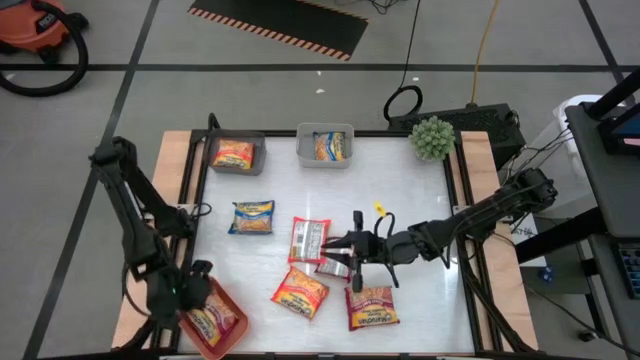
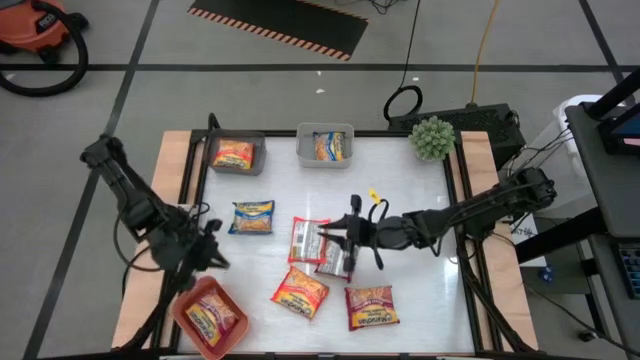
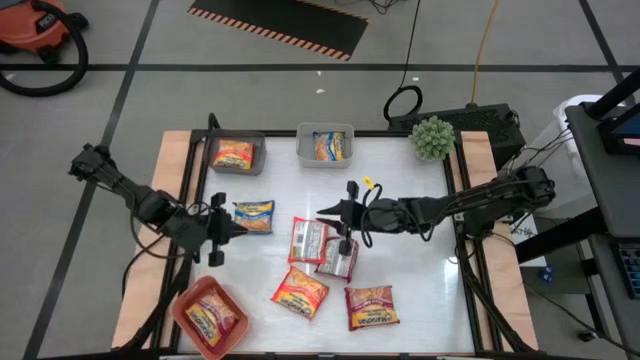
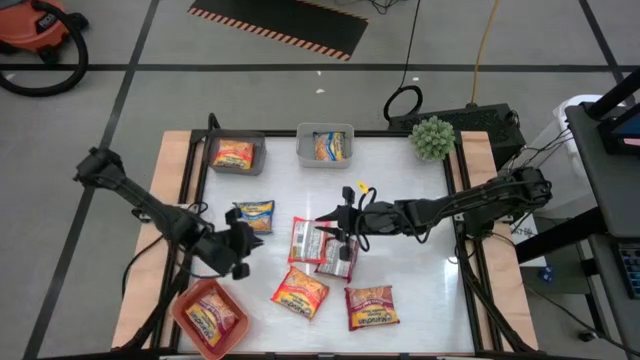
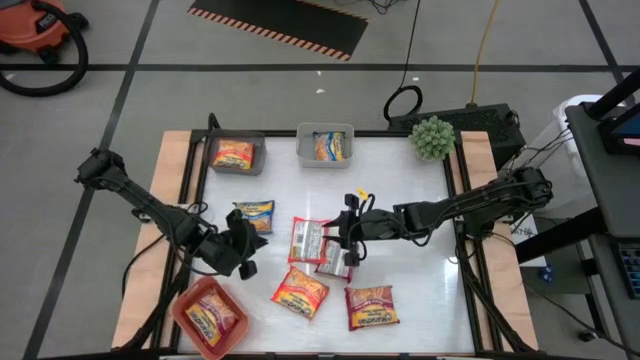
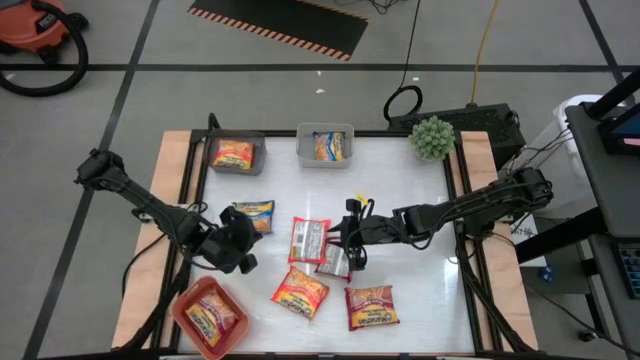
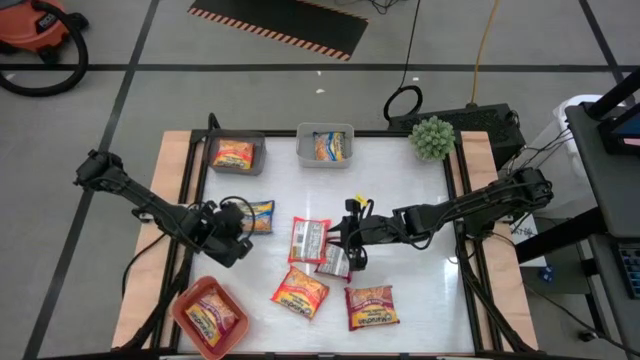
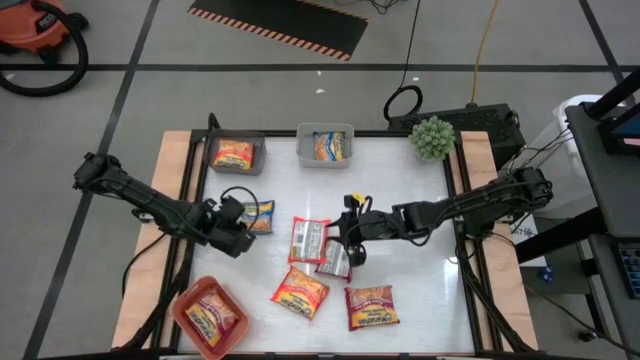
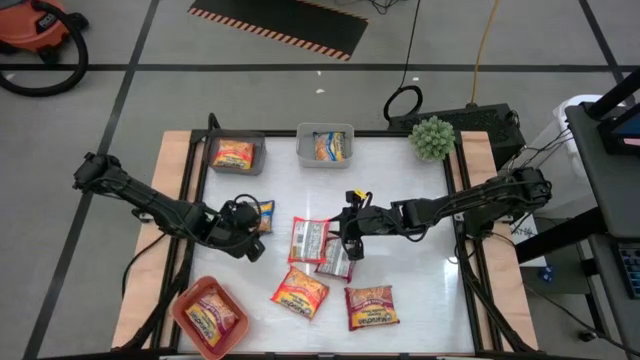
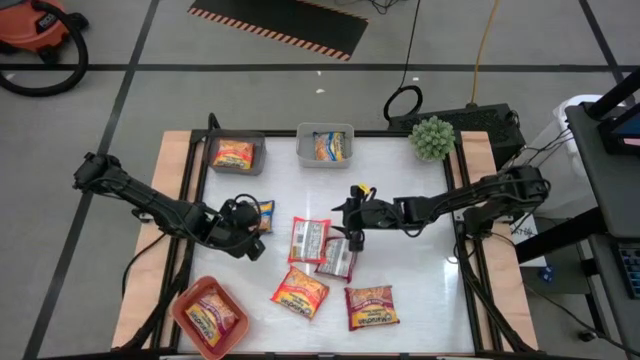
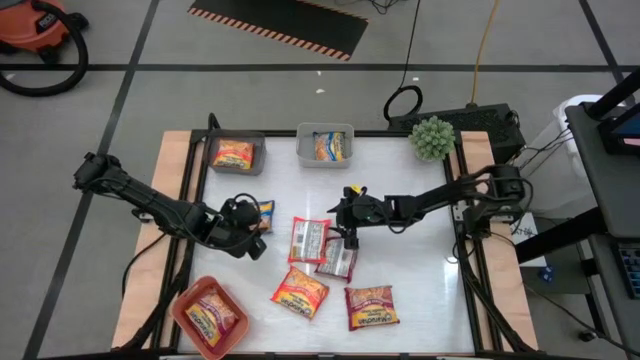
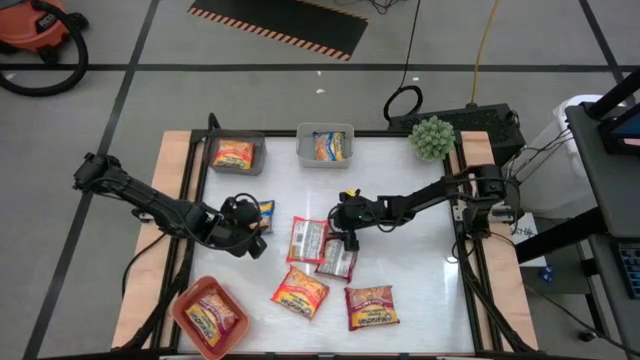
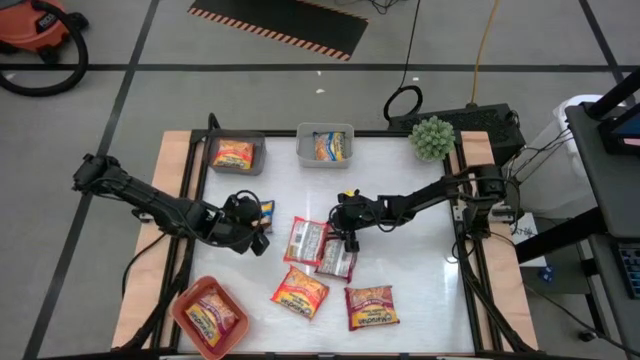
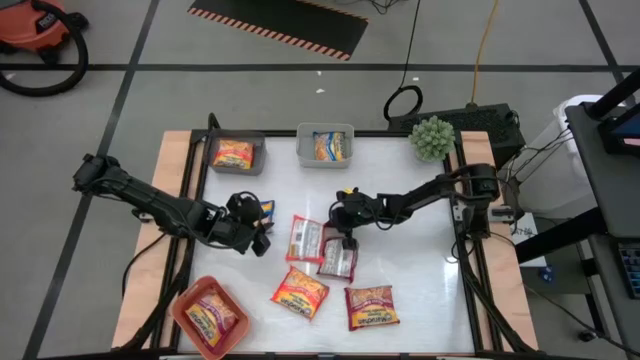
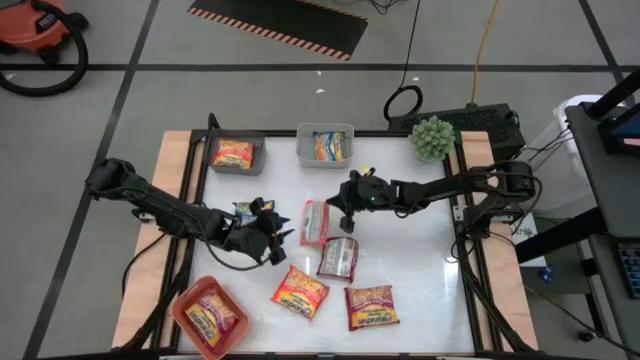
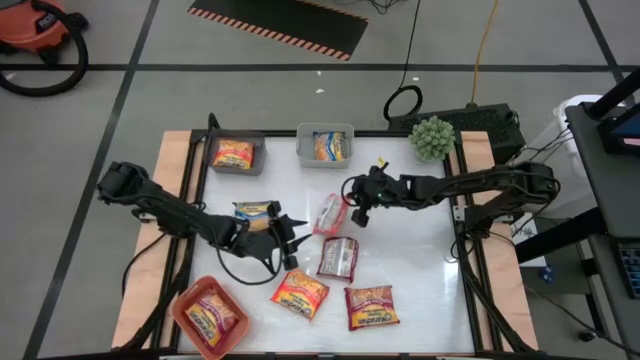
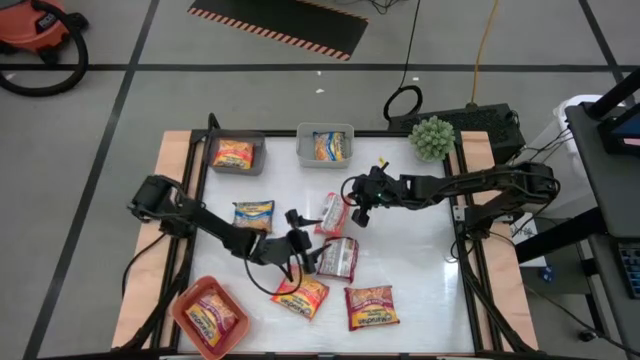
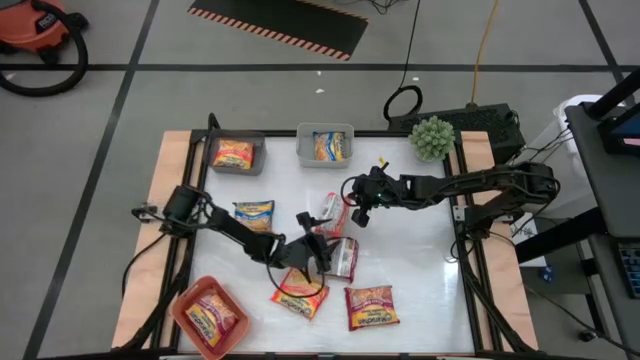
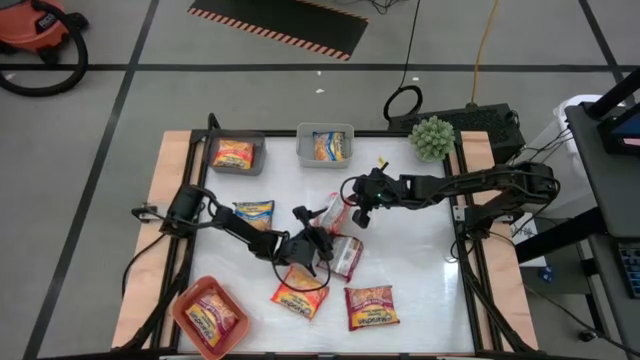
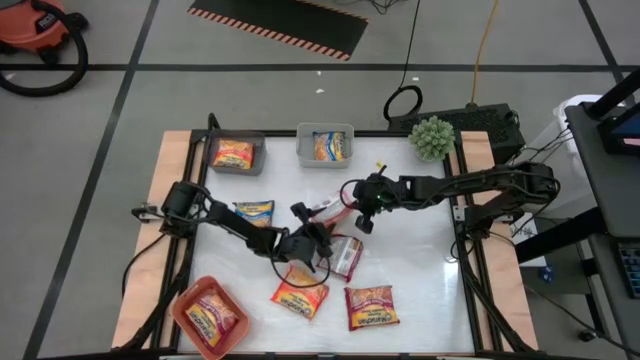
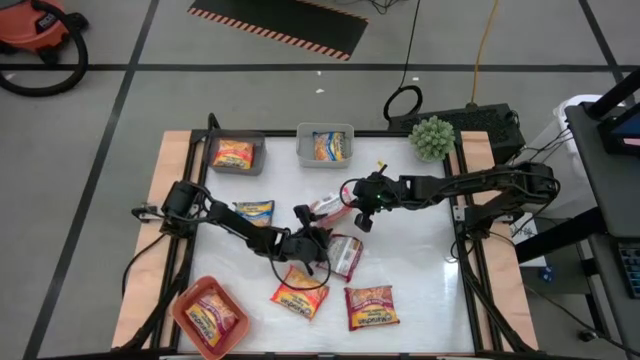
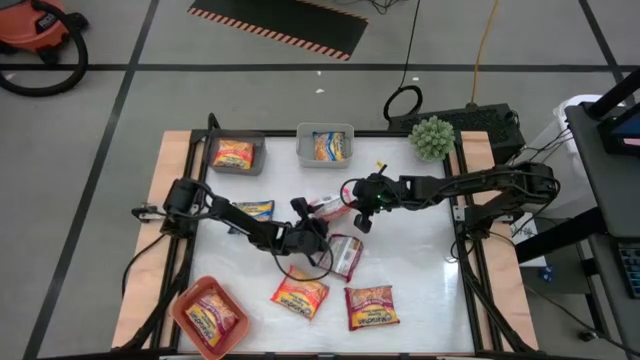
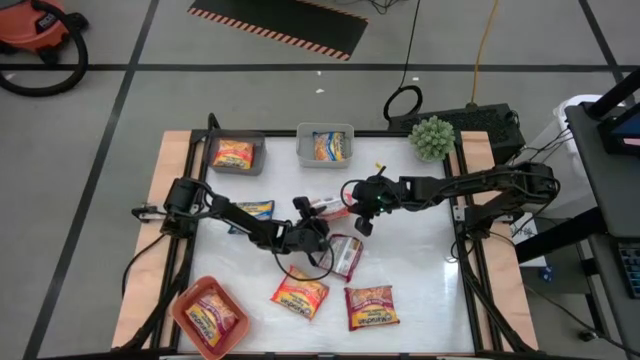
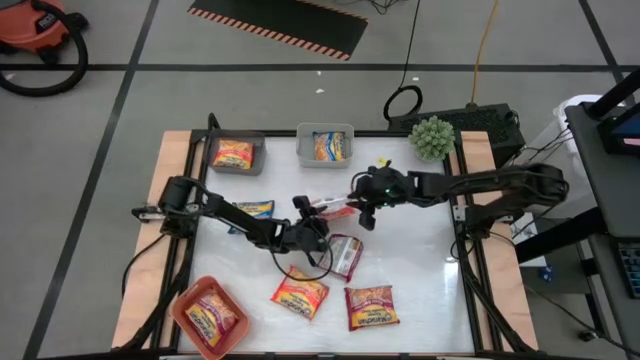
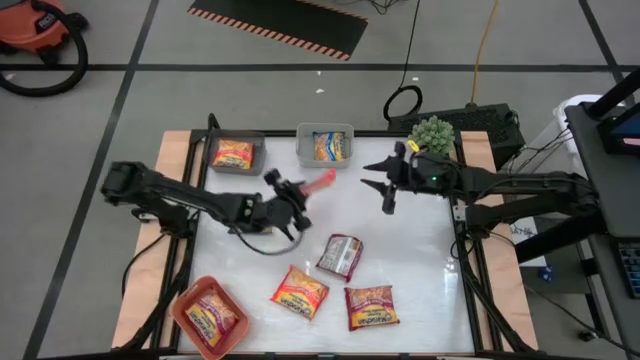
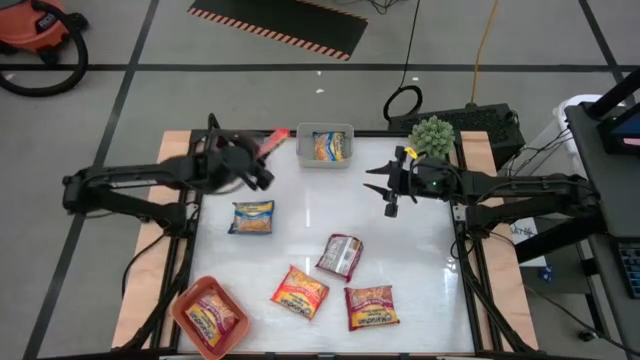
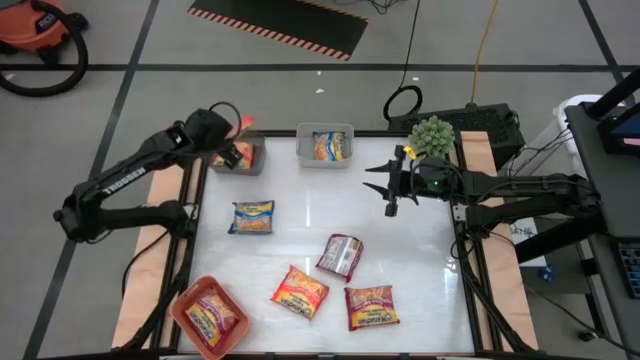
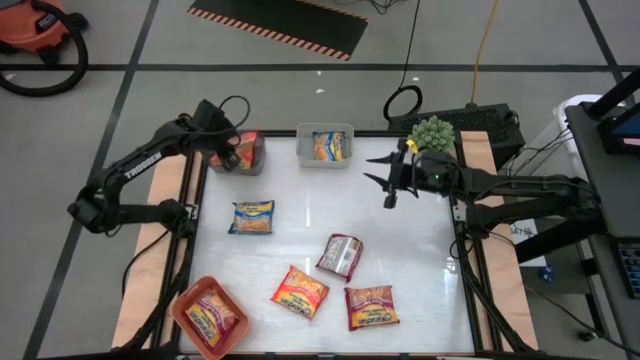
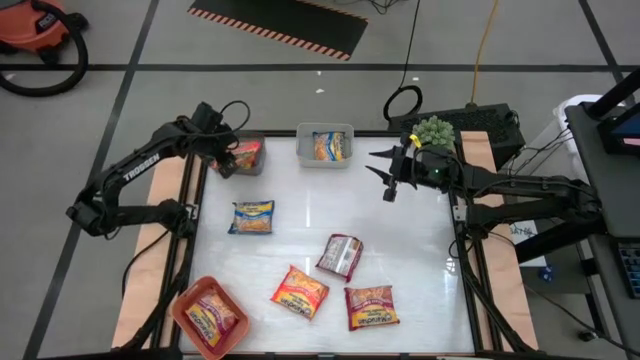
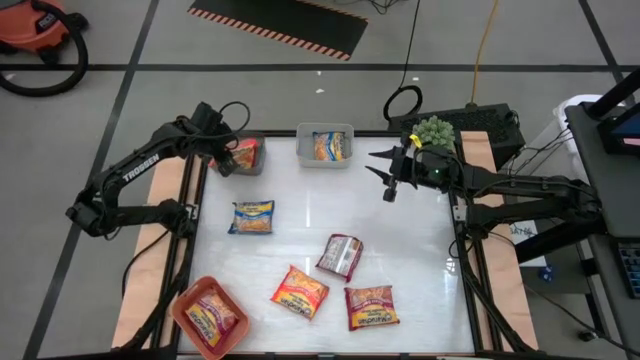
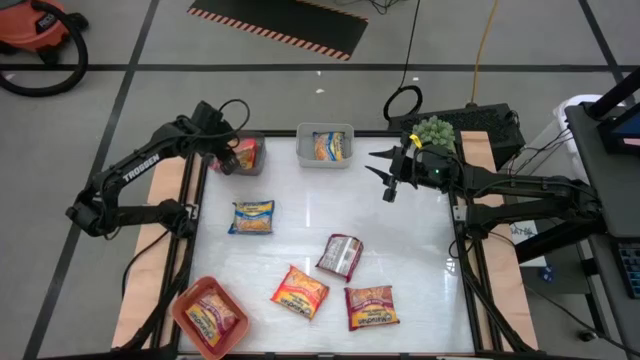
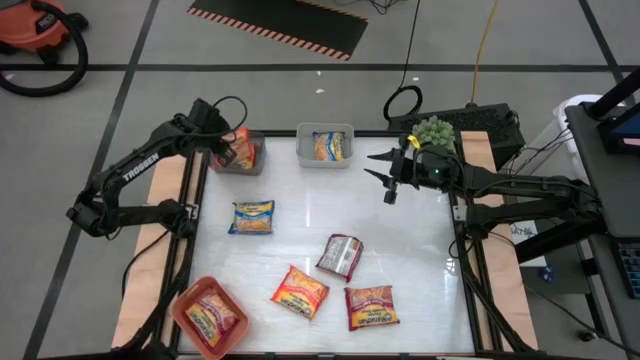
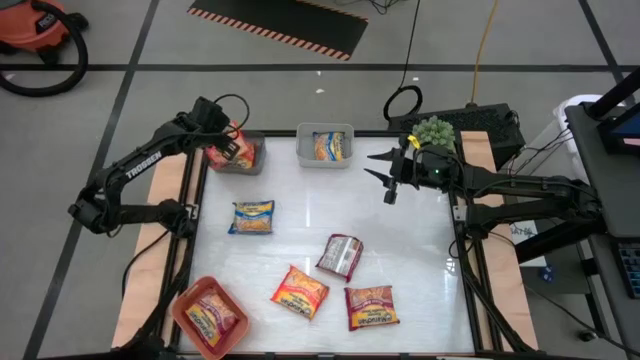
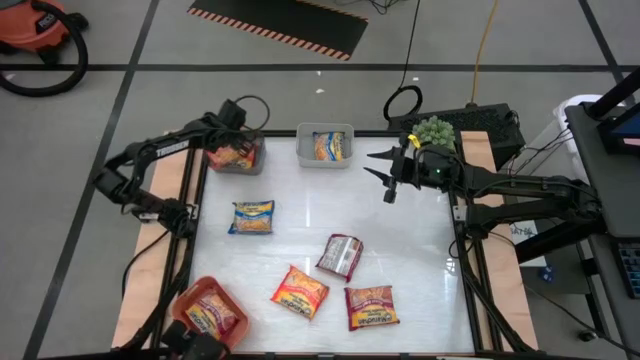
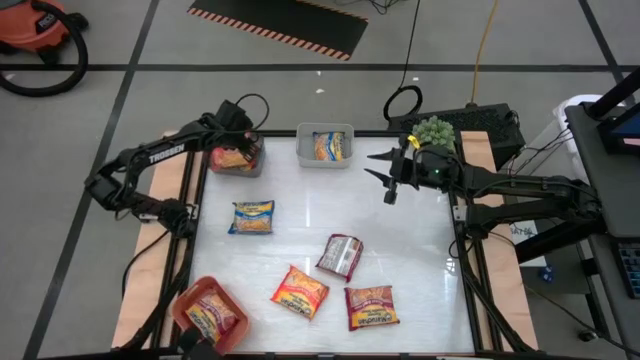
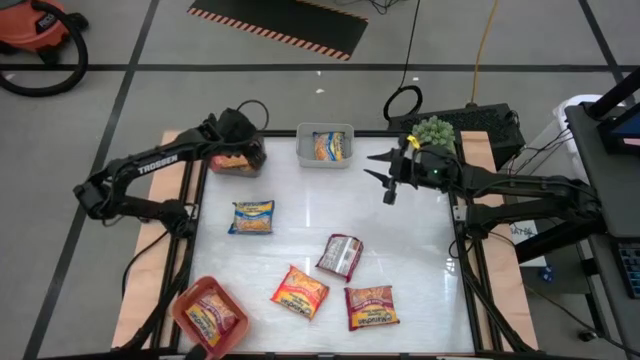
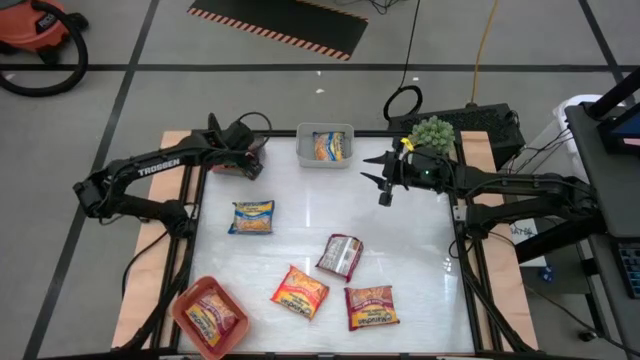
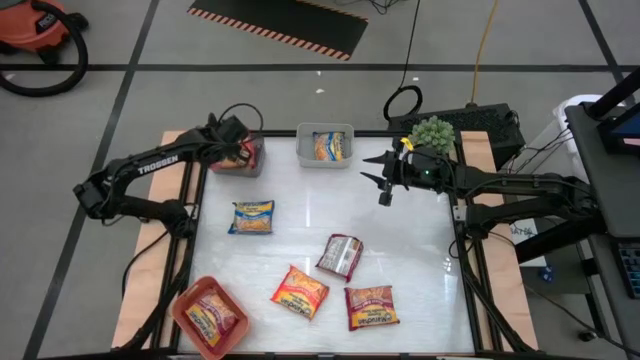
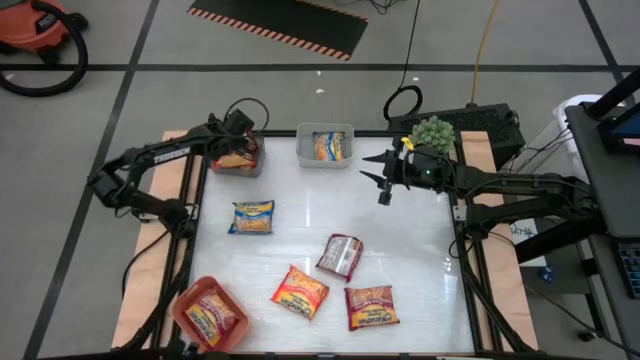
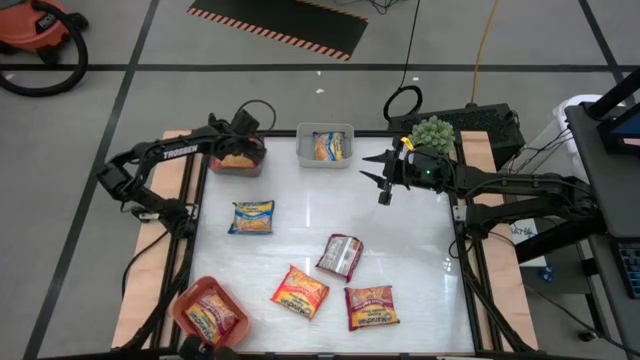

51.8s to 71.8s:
Task: Sort Maruchan noodles
Put the top orange noodle pack into the black bin

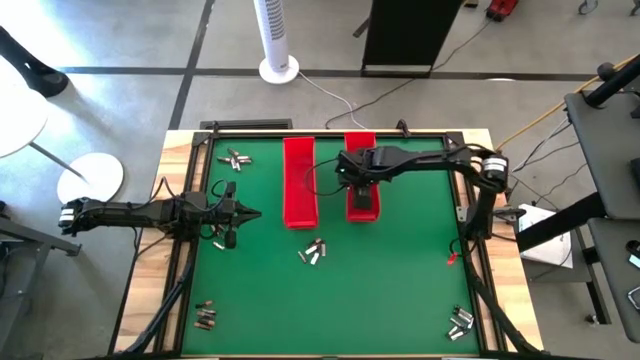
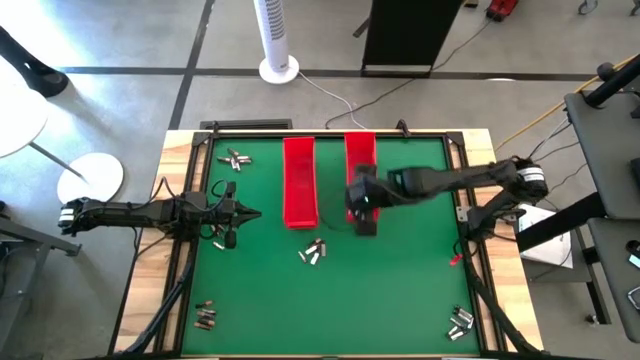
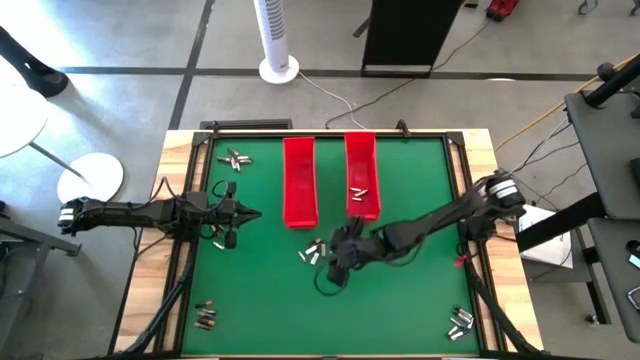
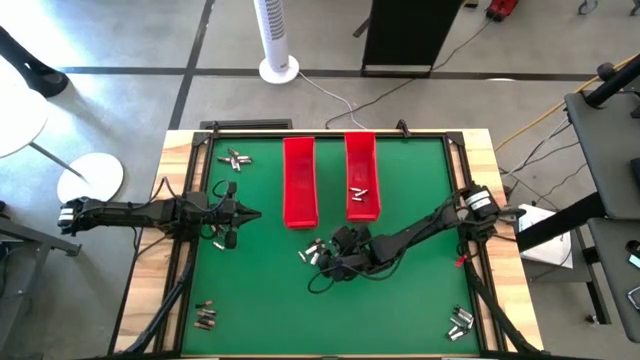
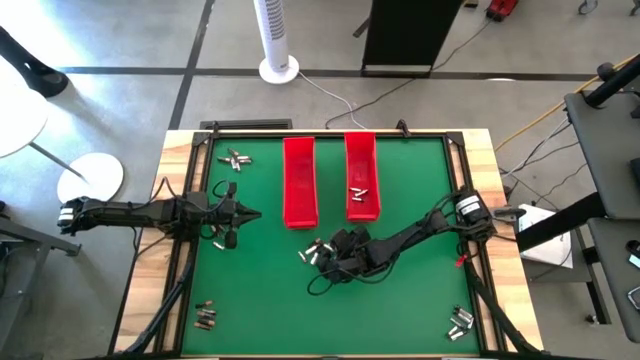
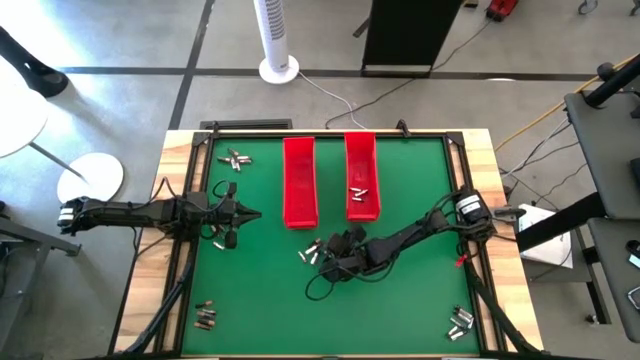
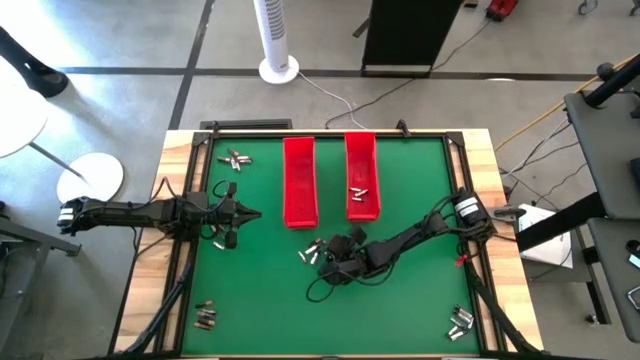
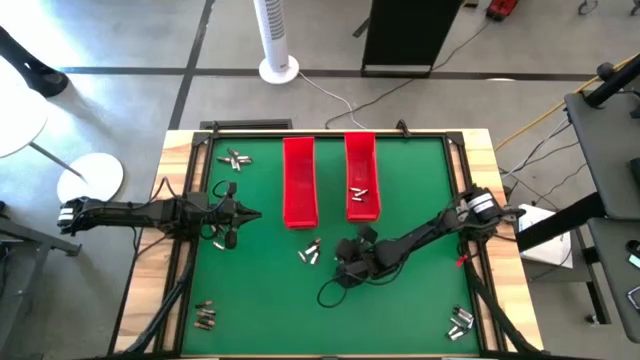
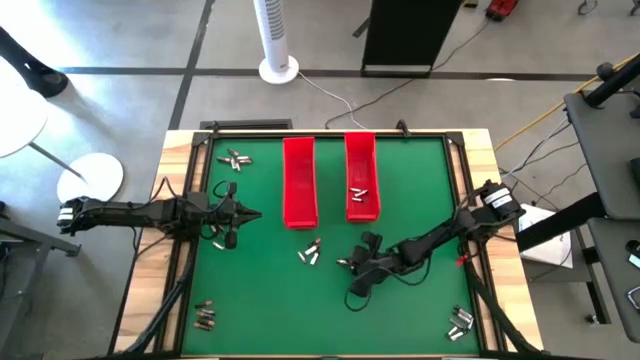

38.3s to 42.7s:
Task: Sort batteries
Put the silver battery into the right red bin
